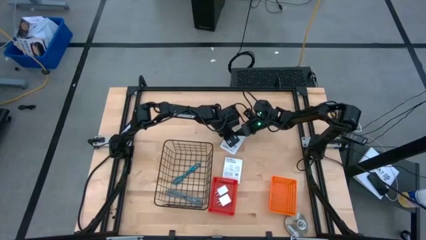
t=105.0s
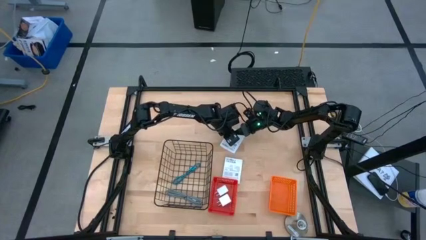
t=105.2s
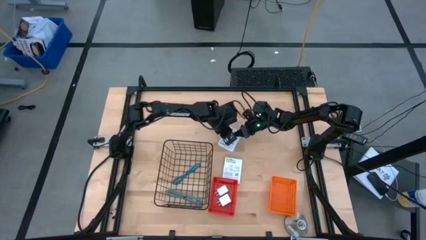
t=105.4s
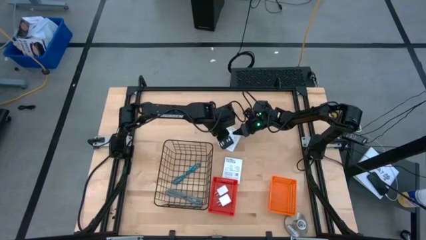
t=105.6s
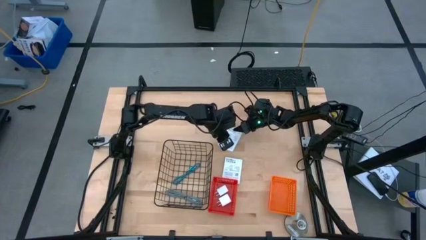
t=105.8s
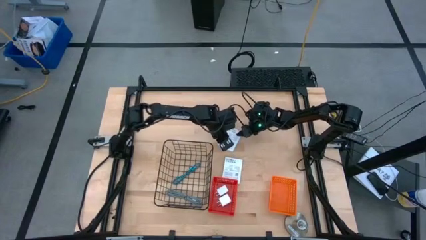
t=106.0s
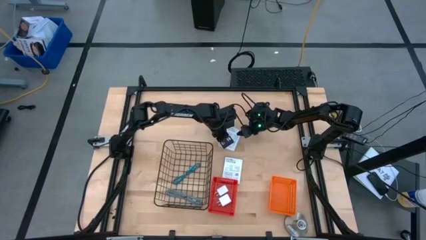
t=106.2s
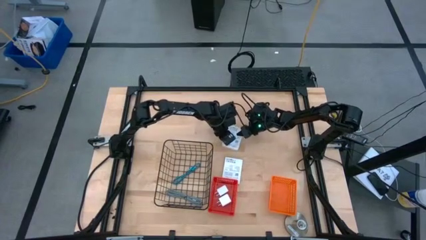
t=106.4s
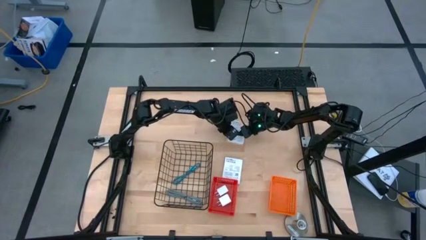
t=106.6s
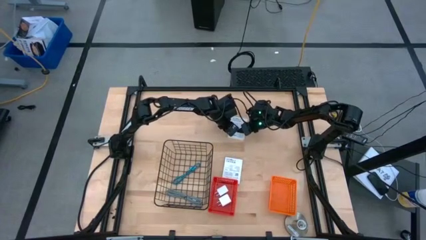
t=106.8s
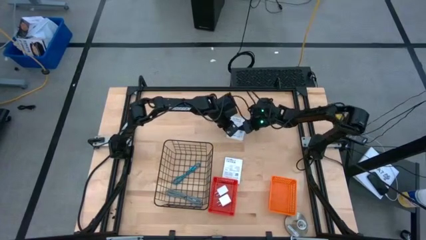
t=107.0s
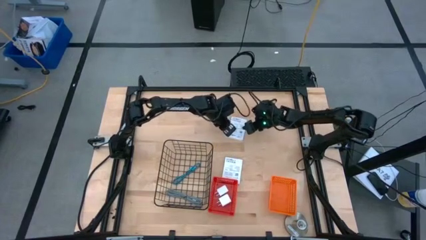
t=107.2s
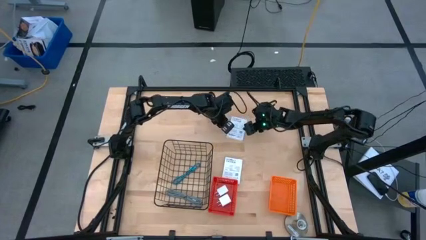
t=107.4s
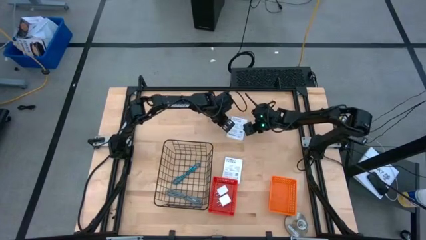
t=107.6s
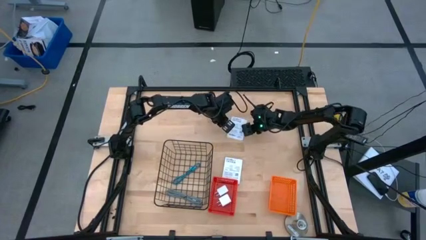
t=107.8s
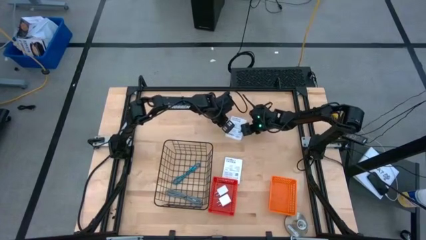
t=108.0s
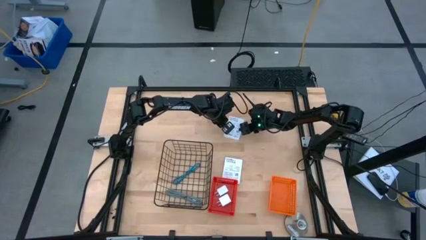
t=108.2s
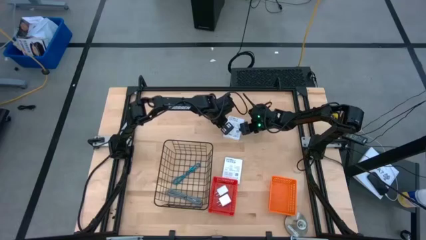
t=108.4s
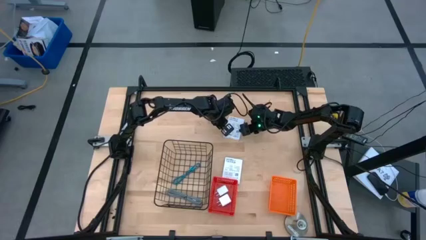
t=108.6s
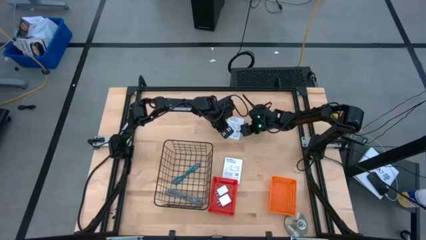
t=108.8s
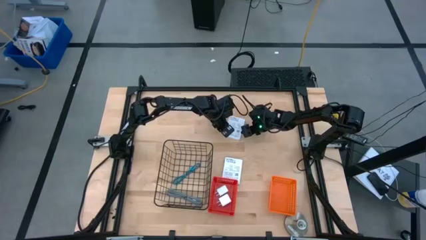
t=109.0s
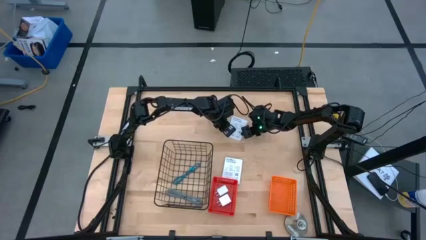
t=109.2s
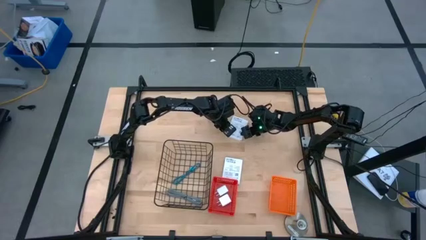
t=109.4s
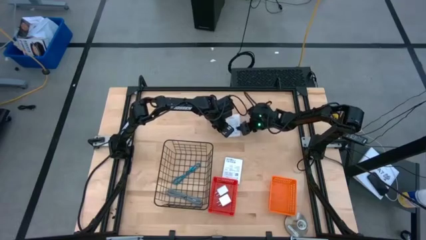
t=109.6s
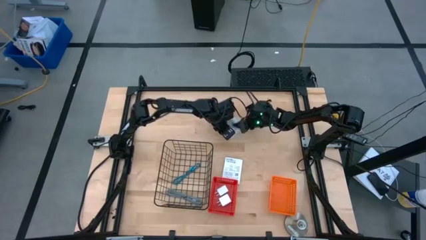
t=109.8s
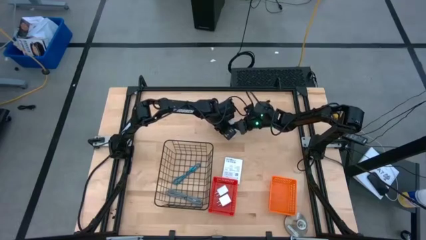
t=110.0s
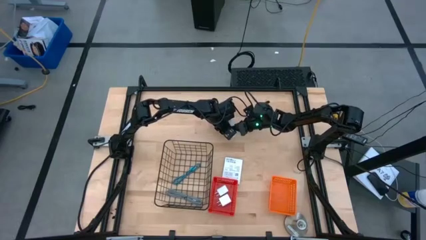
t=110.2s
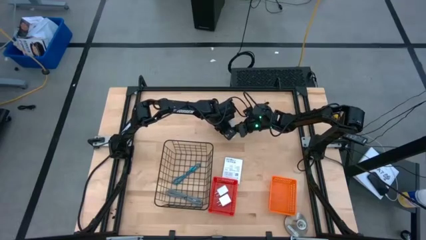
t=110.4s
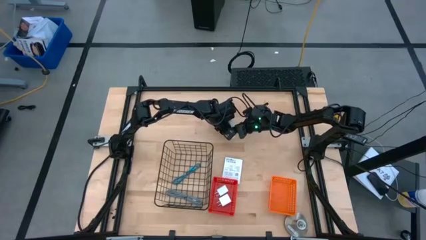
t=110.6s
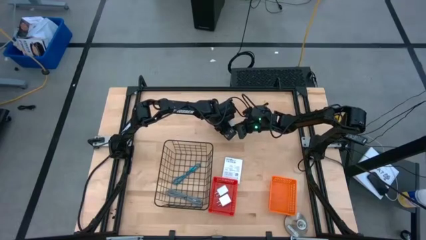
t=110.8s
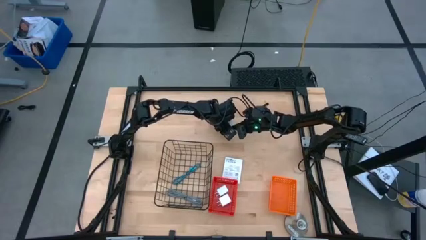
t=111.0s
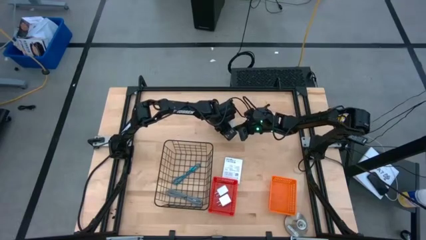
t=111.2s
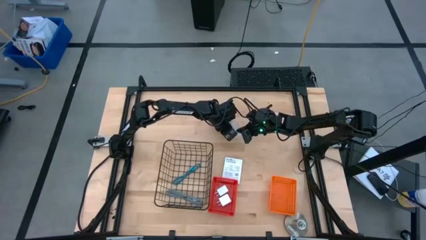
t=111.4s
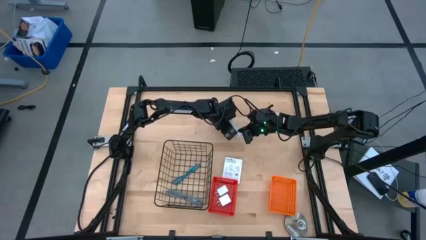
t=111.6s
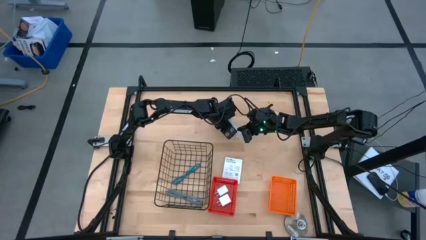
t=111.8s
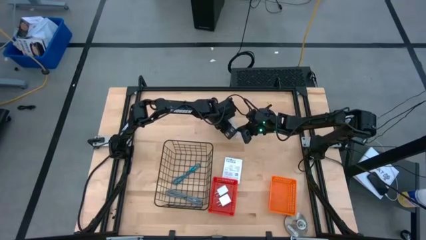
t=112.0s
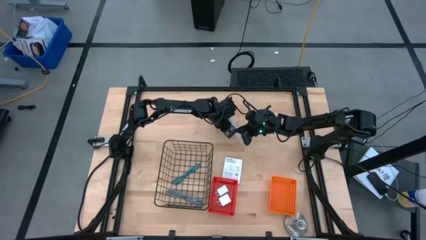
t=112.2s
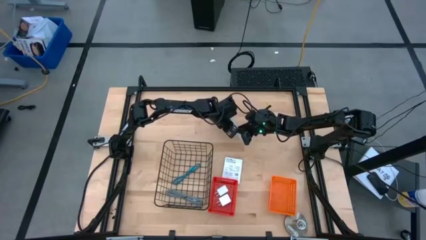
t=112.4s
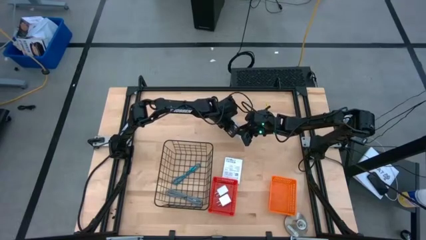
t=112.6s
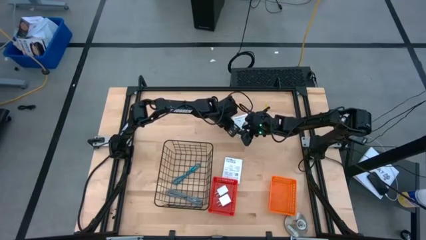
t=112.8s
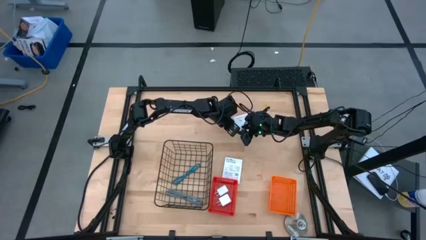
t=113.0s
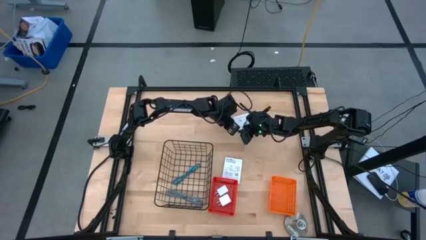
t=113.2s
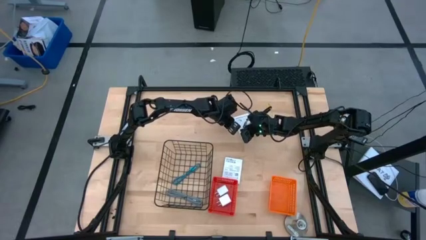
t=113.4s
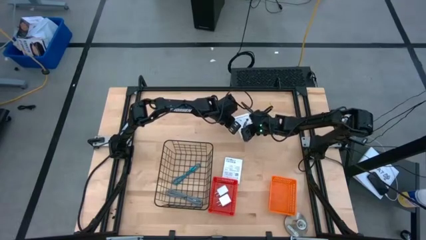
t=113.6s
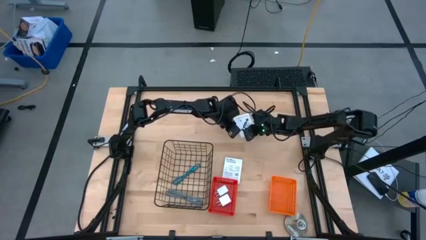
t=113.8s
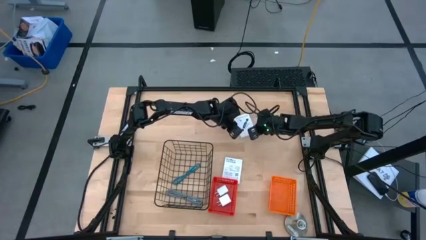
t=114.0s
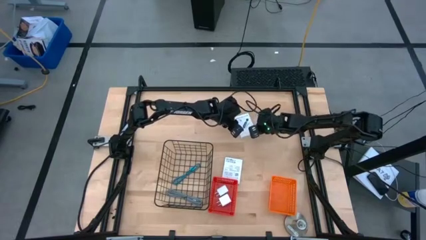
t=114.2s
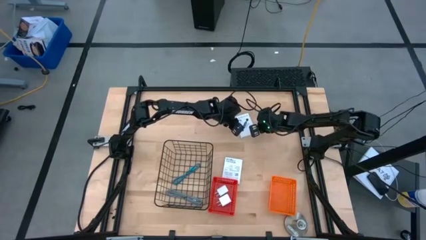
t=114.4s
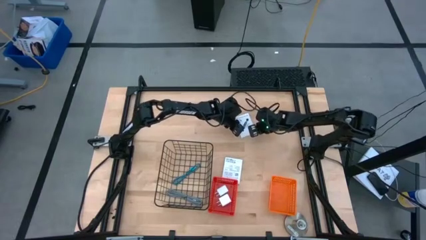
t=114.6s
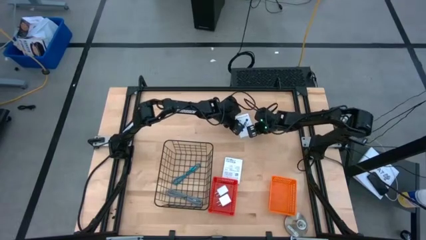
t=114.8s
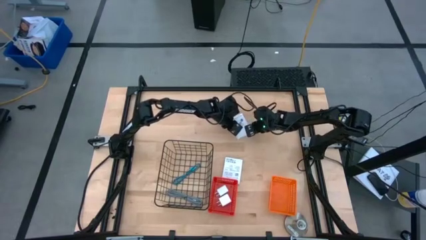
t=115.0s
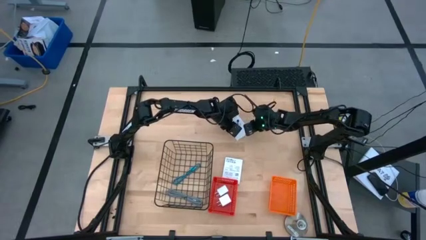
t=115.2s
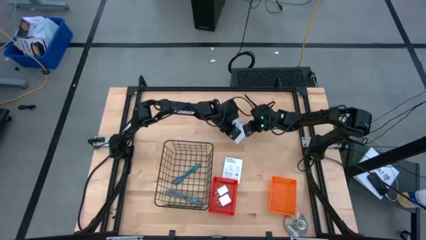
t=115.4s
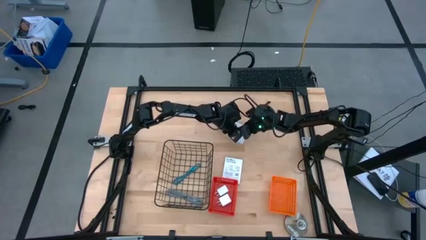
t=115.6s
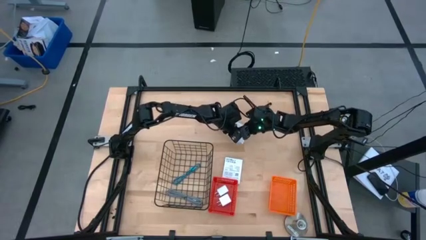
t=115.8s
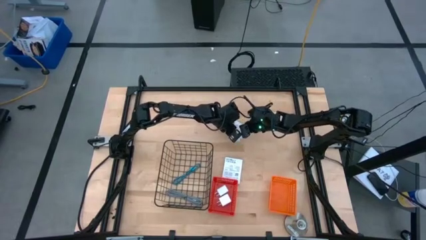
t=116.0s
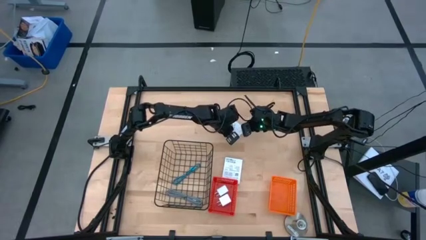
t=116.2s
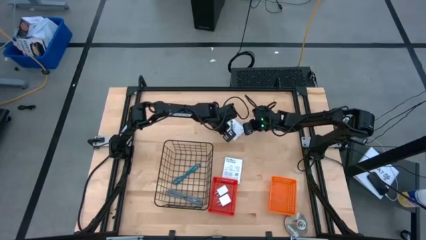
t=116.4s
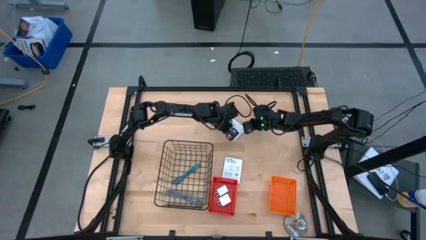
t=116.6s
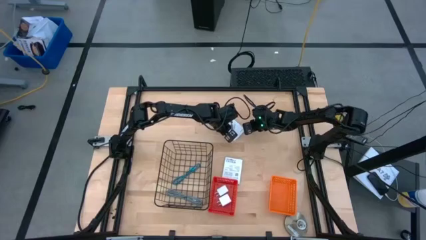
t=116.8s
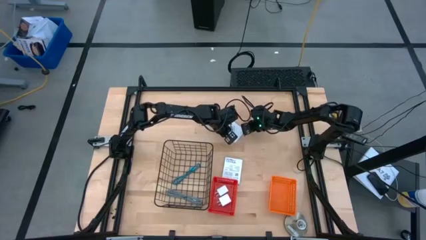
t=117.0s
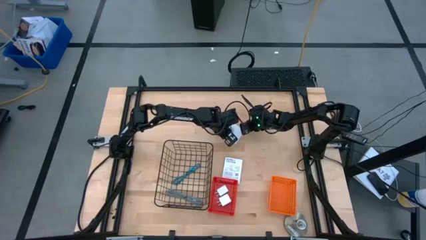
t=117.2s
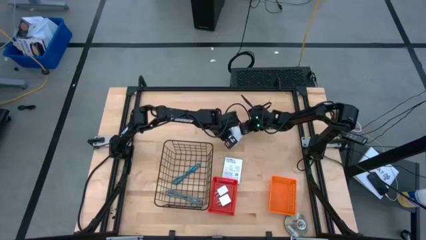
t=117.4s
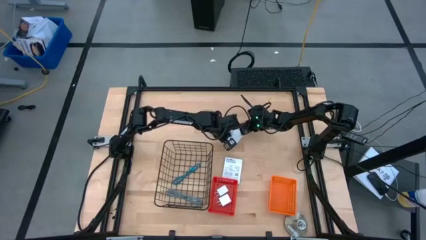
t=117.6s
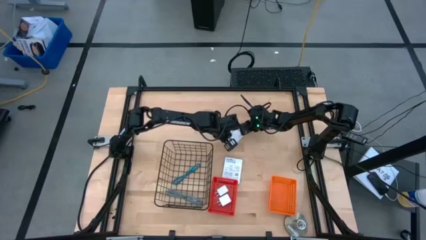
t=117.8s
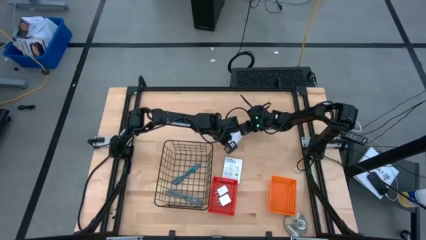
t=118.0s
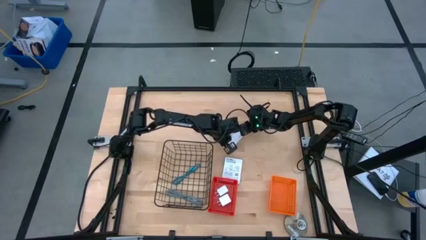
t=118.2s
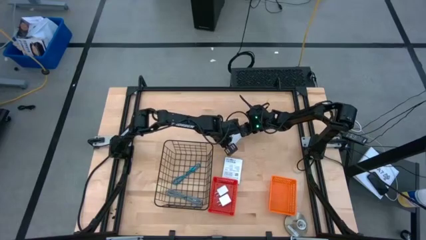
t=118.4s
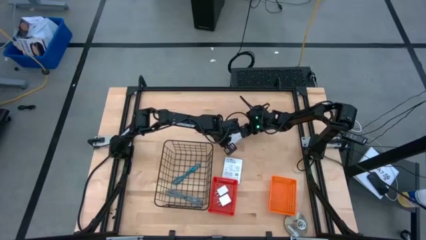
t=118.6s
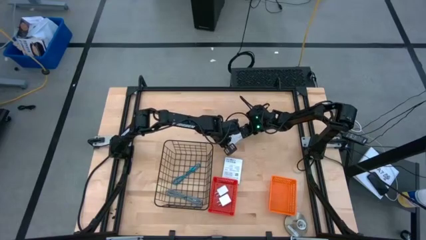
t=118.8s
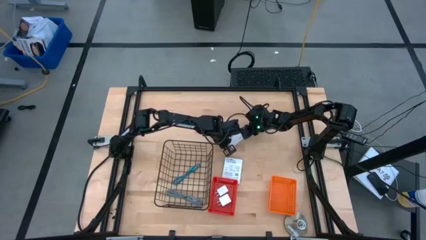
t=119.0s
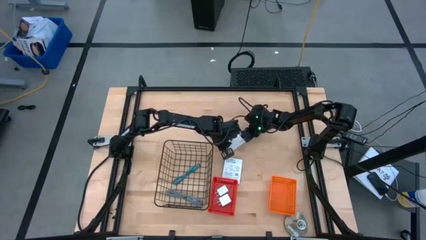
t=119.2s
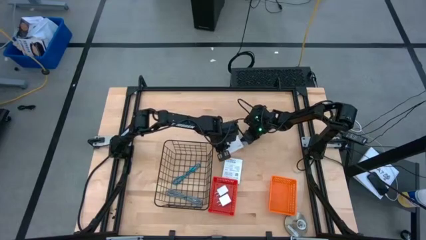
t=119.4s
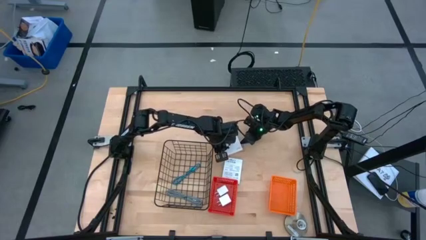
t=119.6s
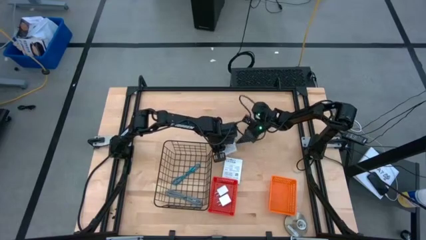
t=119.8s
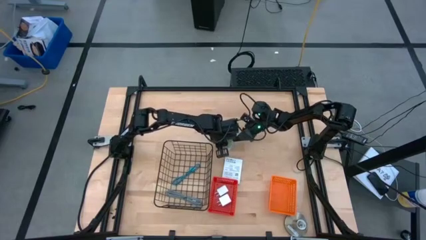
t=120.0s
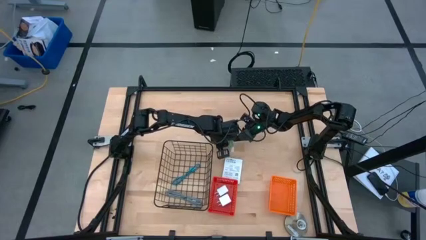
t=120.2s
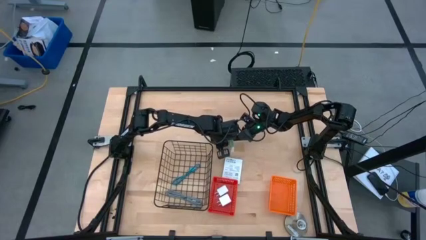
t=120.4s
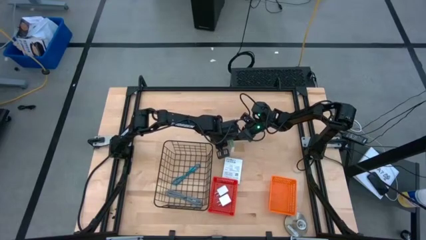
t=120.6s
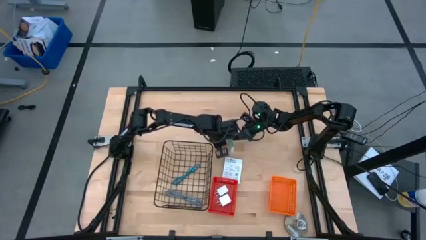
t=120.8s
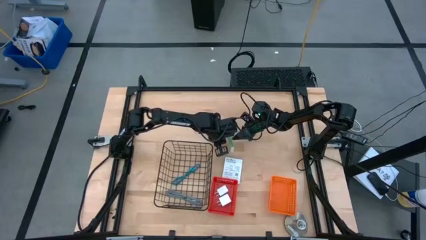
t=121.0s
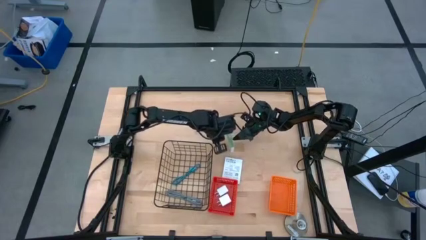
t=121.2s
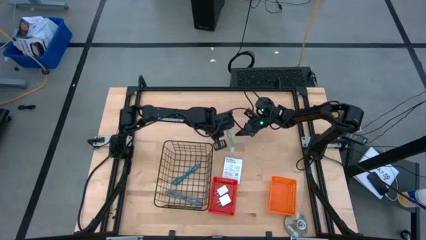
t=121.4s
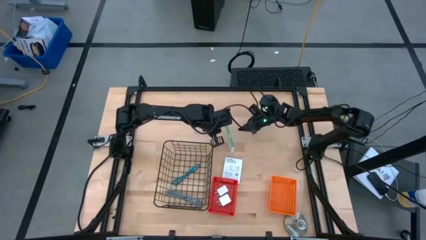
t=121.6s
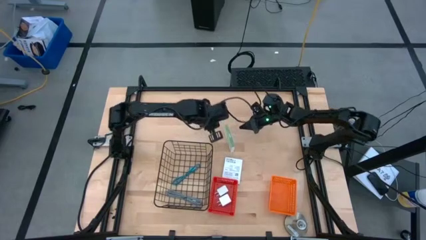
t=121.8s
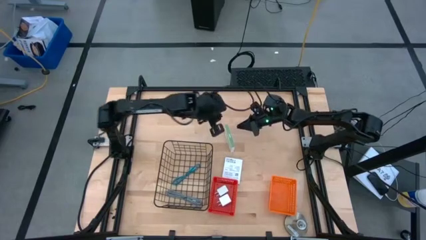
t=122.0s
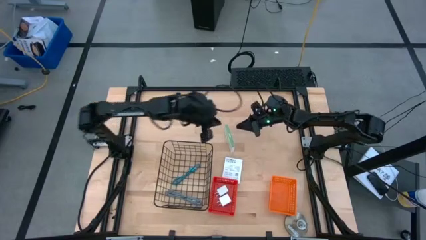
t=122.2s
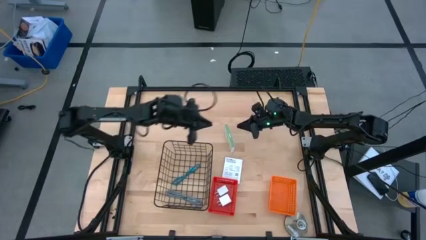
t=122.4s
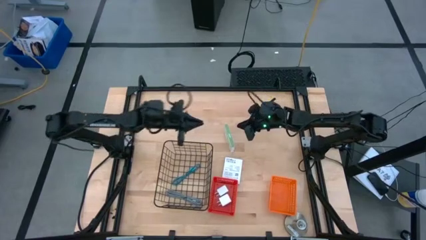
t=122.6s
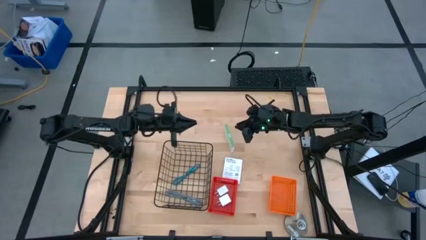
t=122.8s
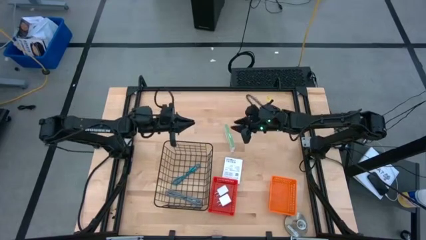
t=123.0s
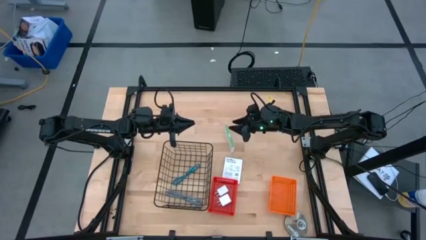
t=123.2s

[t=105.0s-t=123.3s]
Task: Pick and place items into bin
Put the top card reader box into the orange basket
